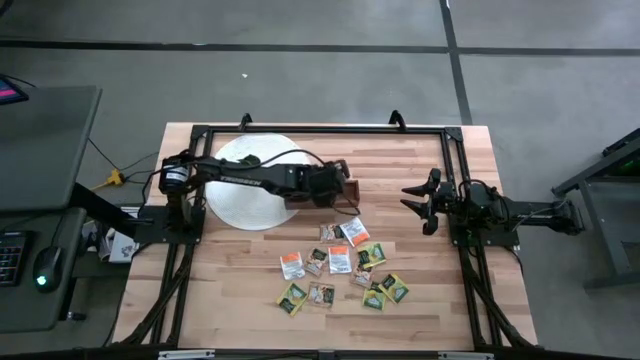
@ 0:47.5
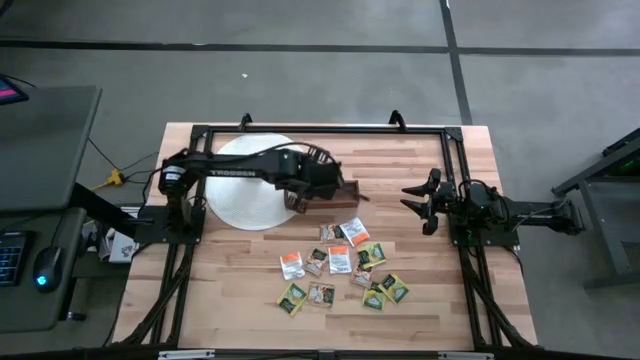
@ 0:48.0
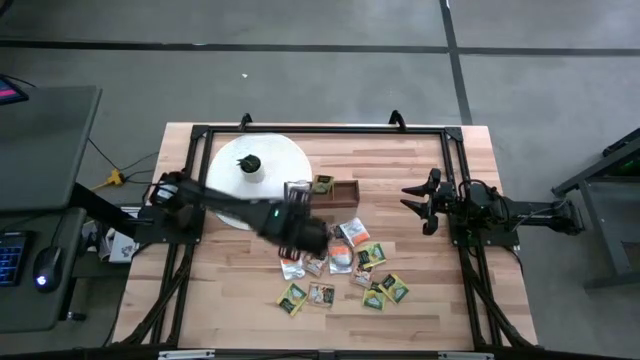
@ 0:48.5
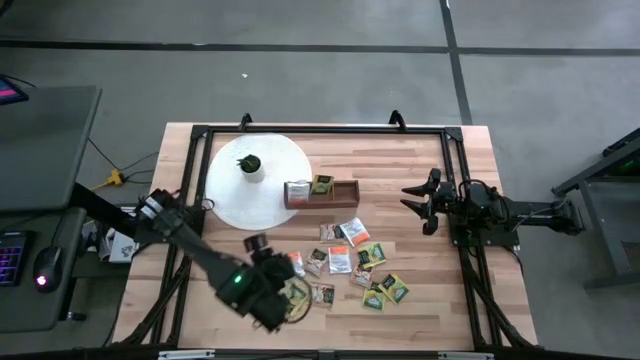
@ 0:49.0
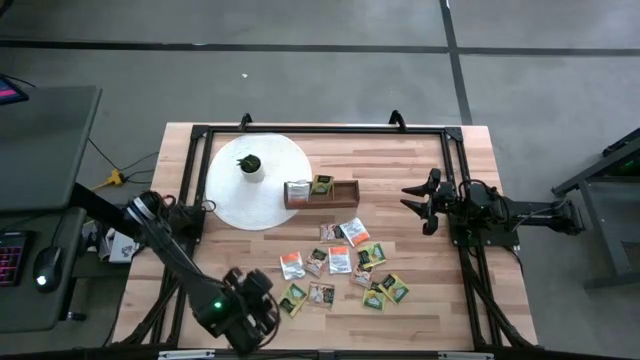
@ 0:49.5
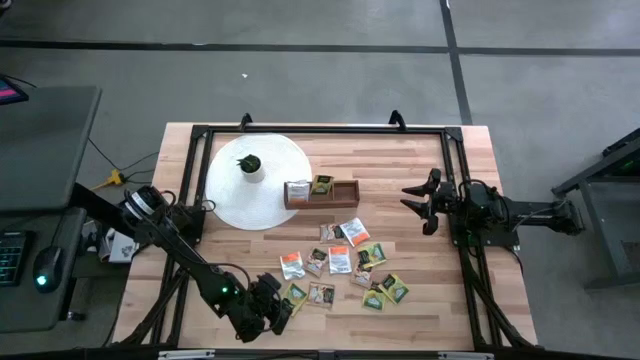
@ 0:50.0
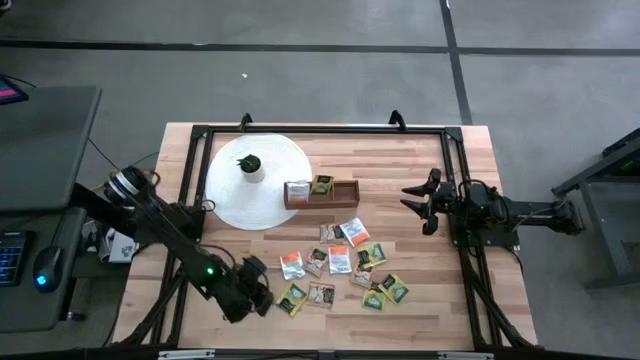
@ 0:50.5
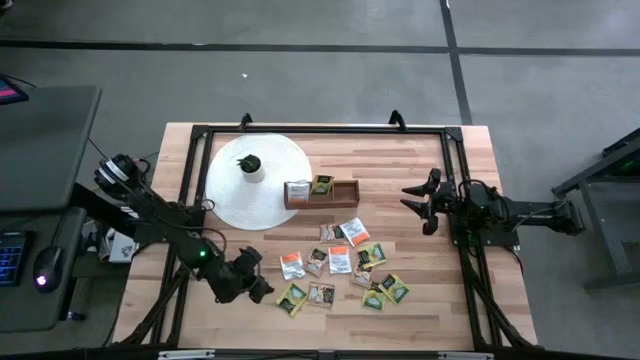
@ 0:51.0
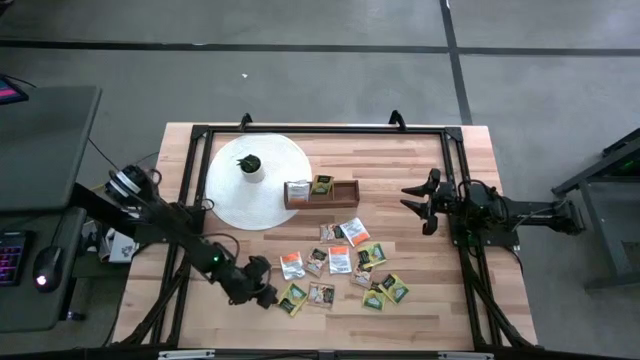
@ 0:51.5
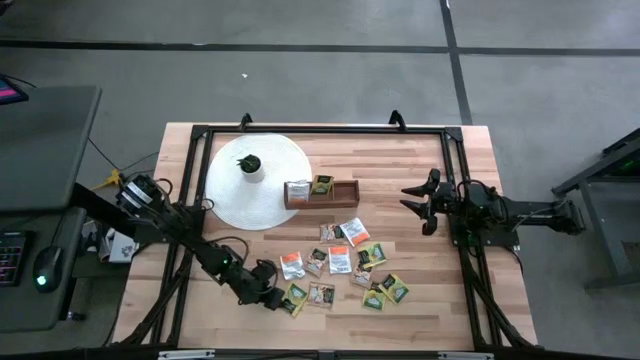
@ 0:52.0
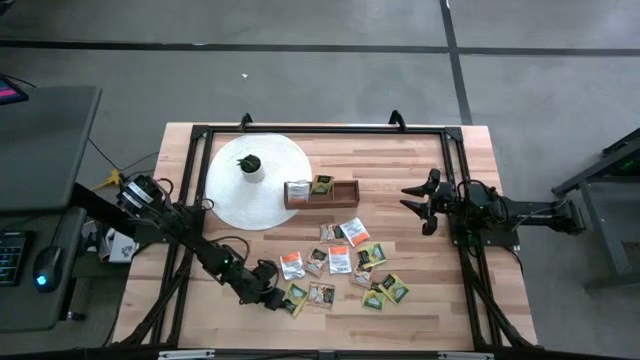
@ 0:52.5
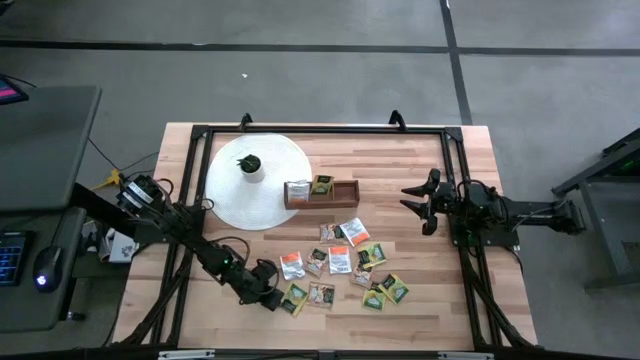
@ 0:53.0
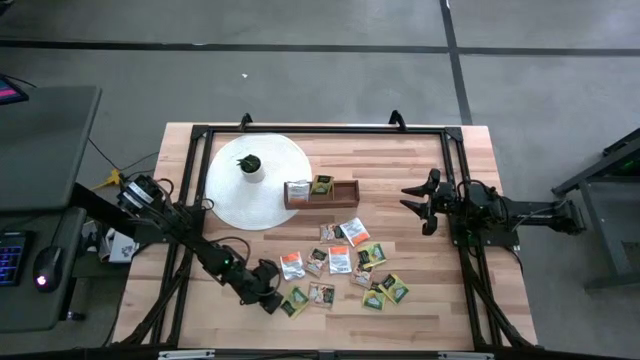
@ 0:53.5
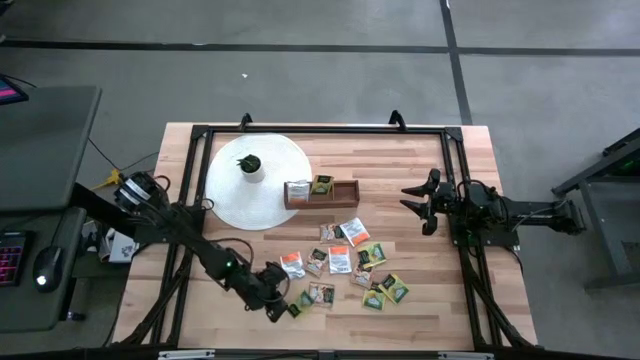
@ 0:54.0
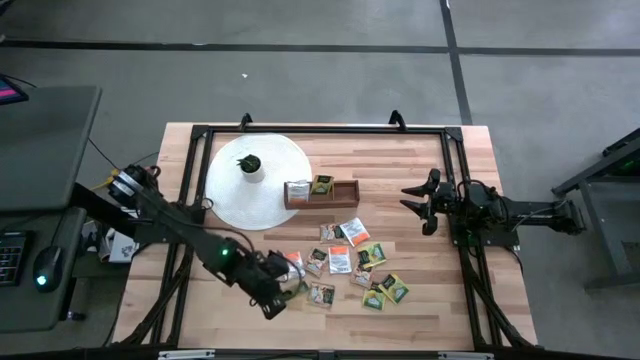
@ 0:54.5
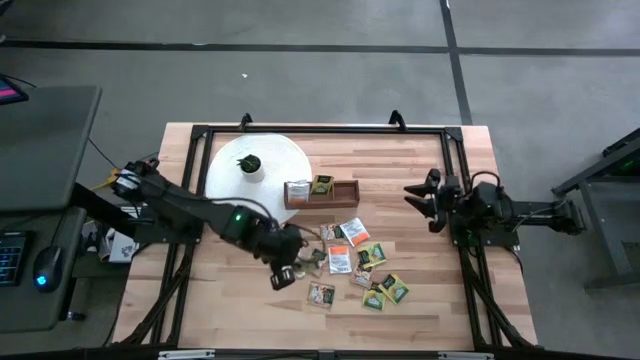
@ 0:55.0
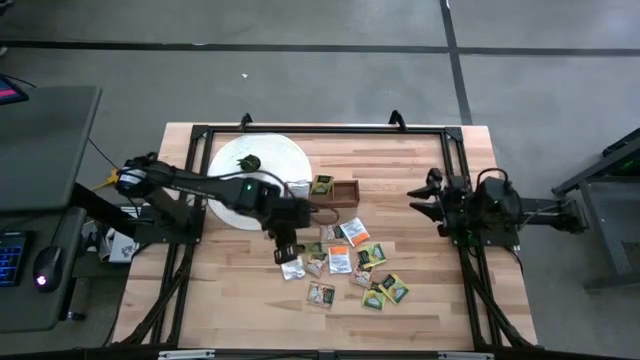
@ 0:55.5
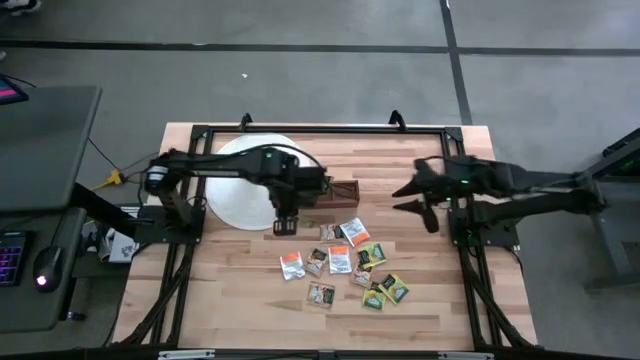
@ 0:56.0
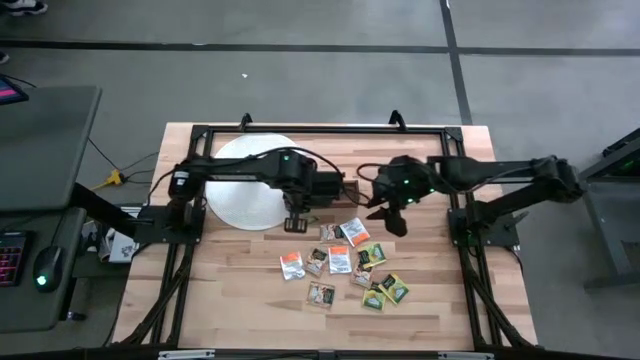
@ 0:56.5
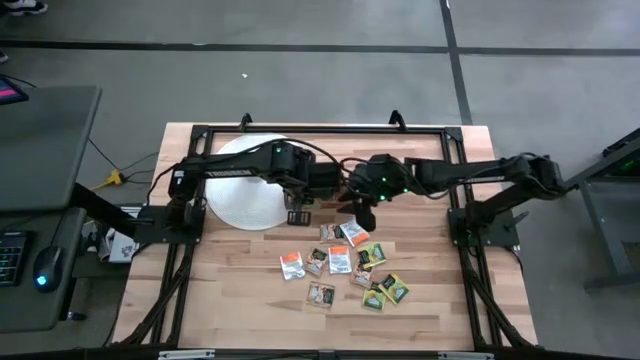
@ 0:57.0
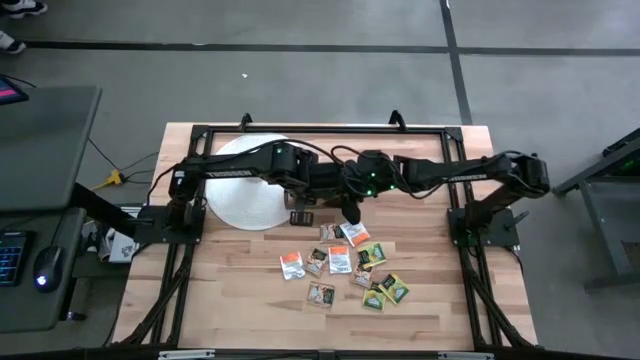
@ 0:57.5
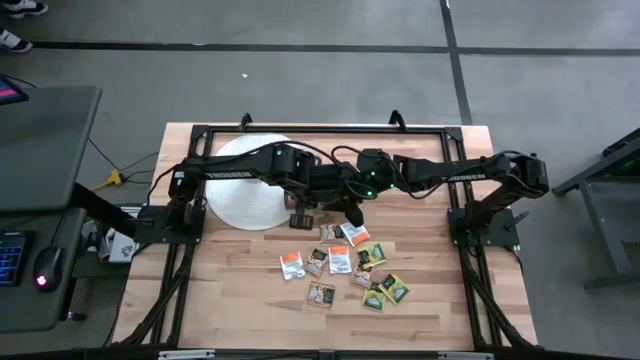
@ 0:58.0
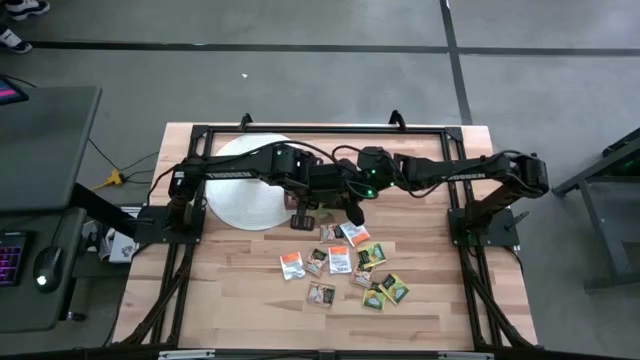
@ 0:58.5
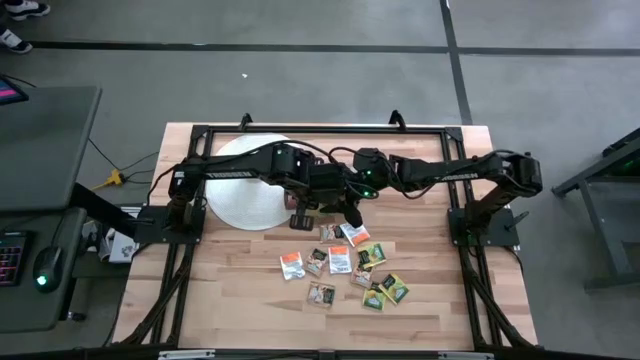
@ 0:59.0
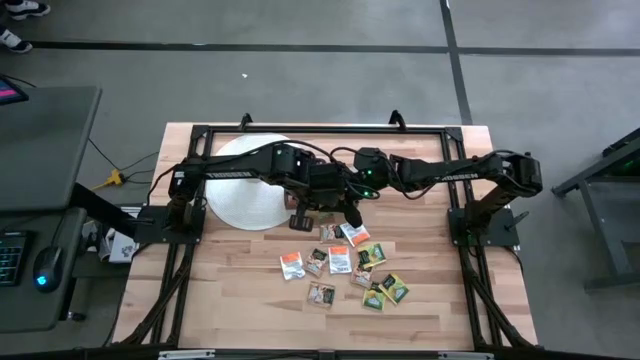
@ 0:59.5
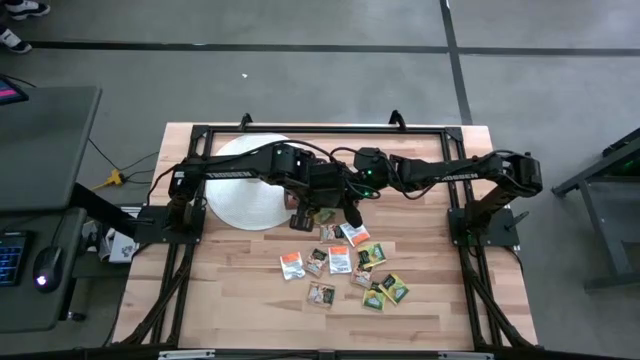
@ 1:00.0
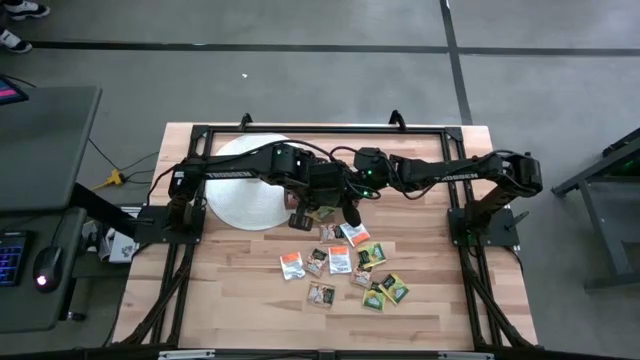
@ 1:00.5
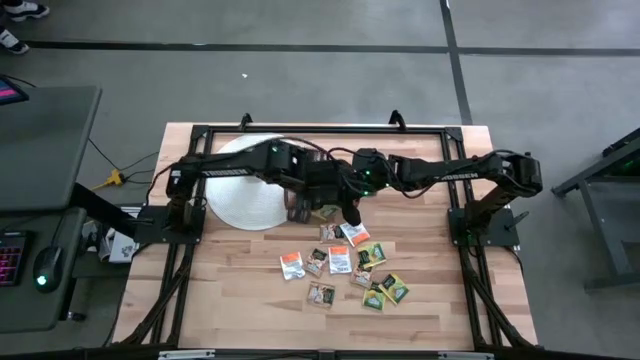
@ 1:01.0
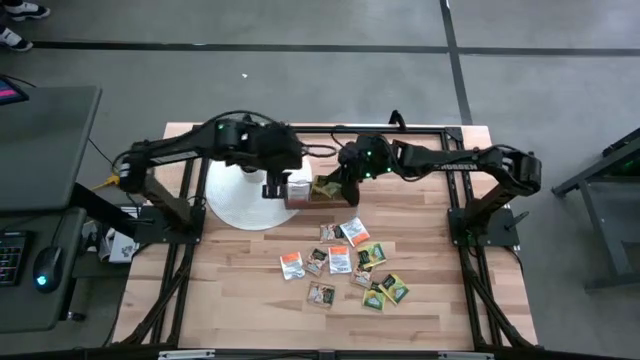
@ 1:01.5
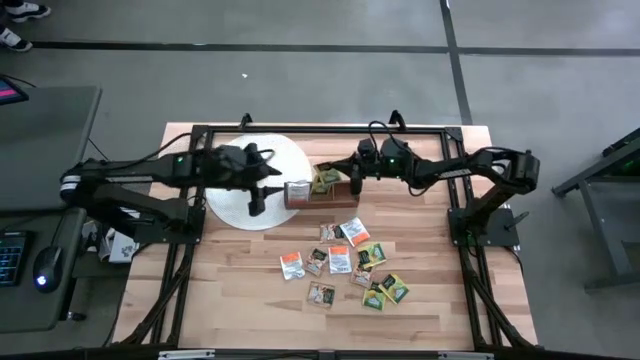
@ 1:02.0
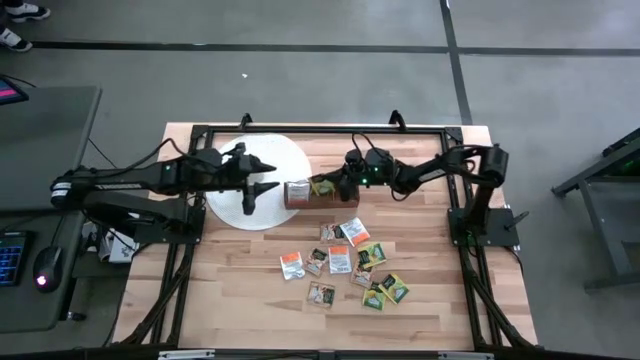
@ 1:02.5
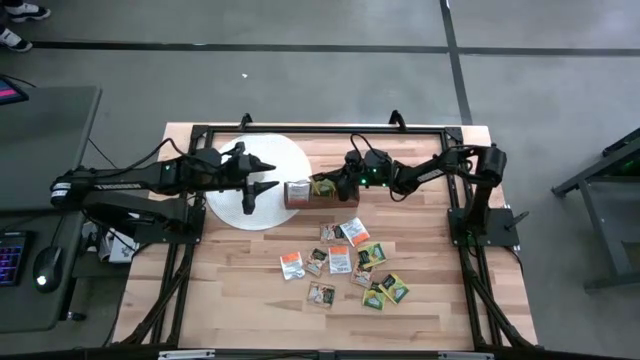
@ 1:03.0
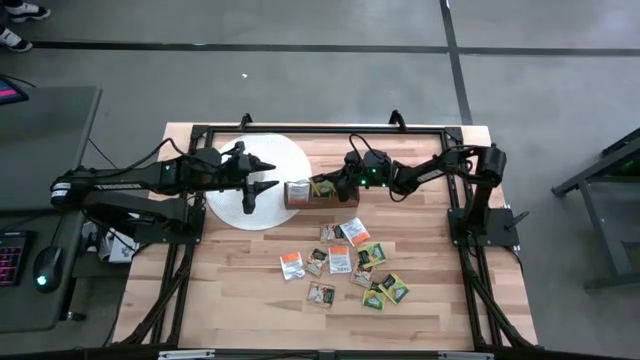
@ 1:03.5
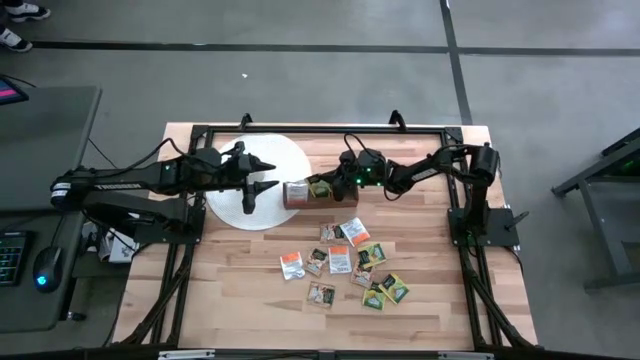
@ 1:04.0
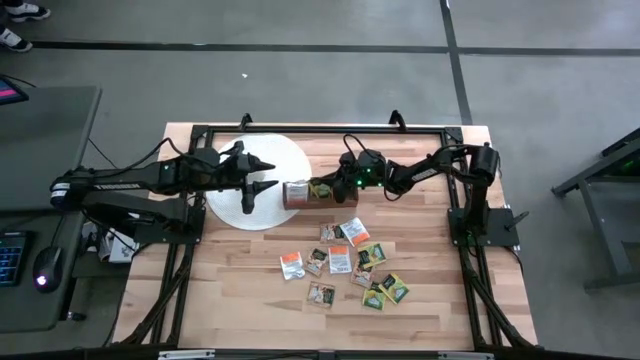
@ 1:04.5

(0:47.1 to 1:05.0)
Task: Pick & Place Tea
Put the yellow tea bag into the middle section of the wooden organizer

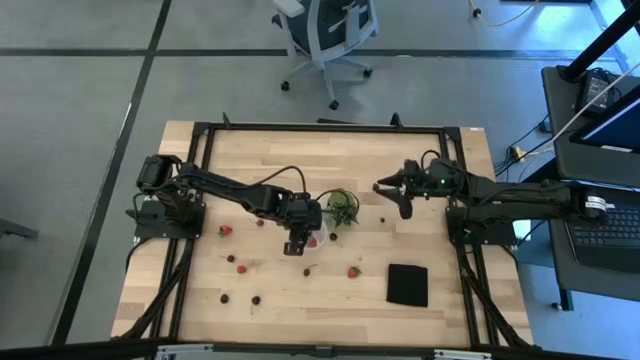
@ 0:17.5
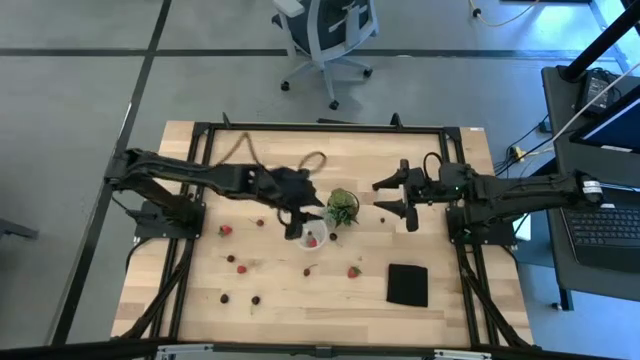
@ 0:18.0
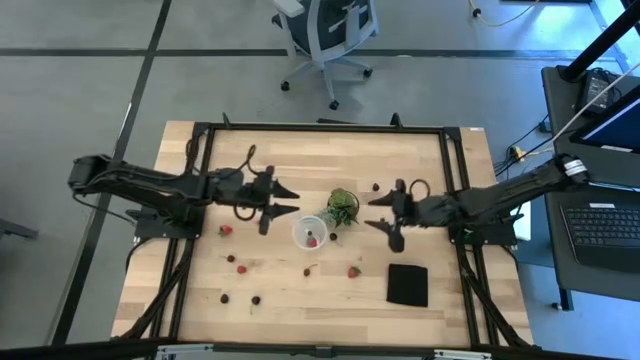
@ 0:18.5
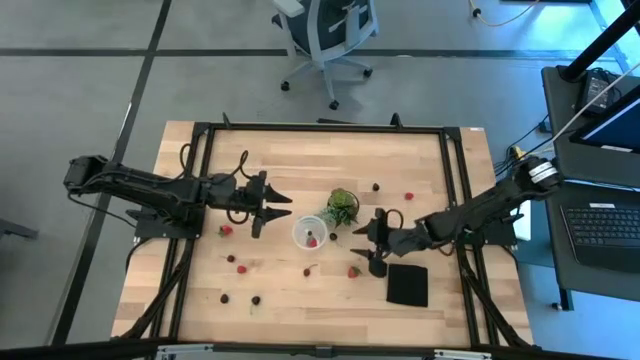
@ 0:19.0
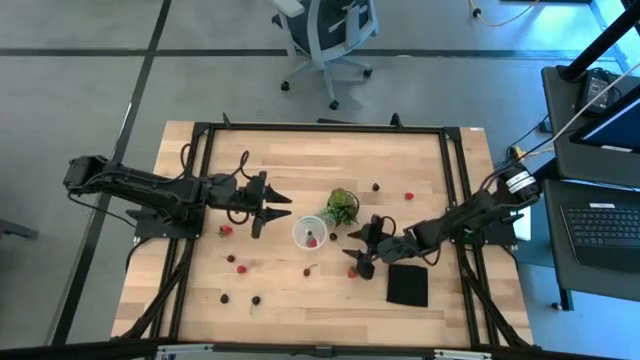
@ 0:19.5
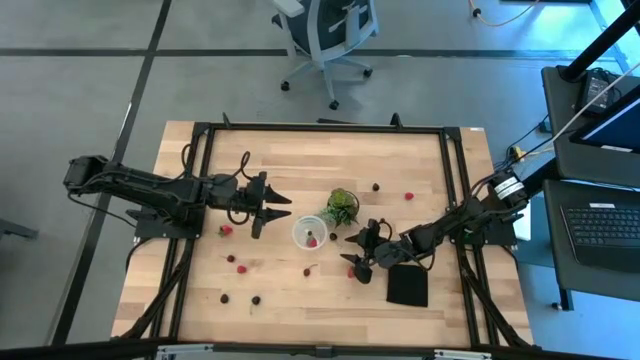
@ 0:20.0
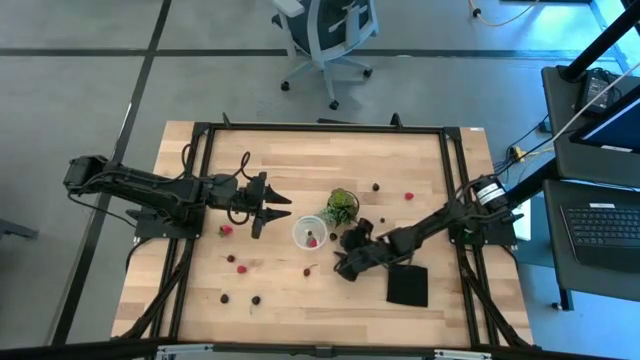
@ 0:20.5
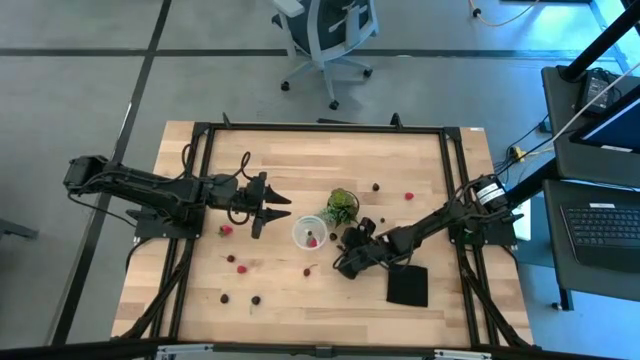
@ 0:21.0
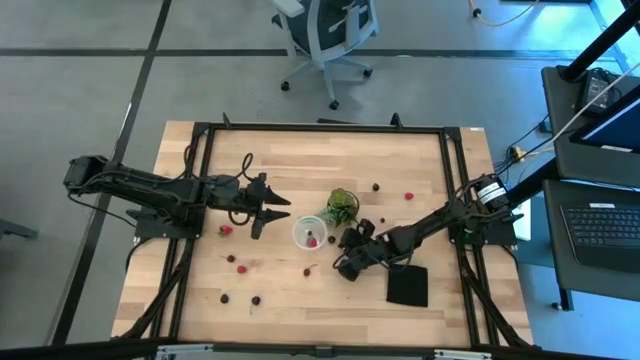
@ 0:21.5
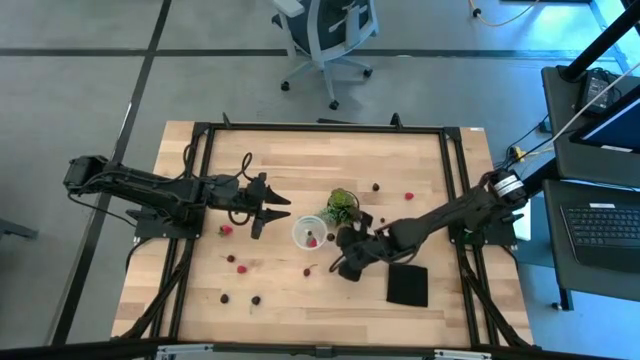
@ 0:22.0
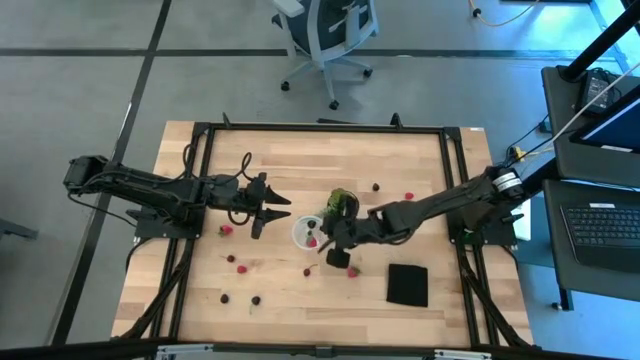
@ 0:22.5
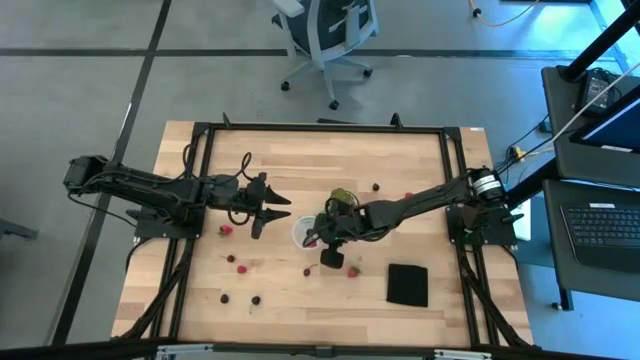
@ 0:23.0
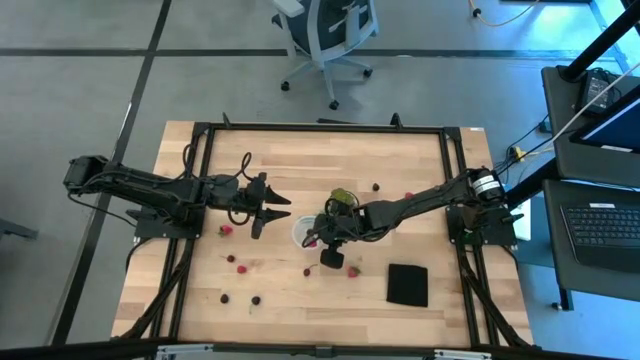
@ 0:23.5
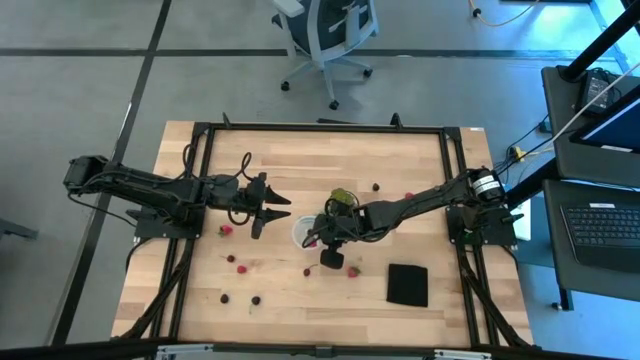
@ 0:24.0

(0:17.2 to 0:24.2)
Task: Pick and placing Produce into tupperware
Put the top black cherry into the transparent container
